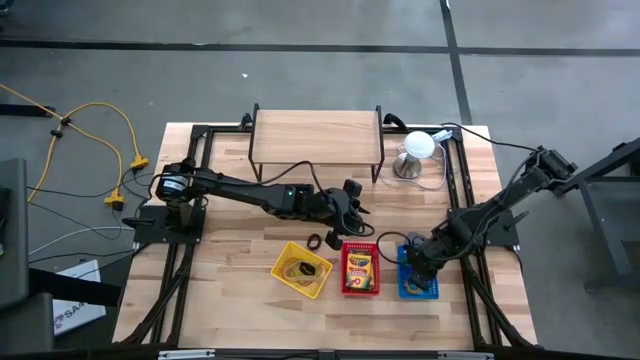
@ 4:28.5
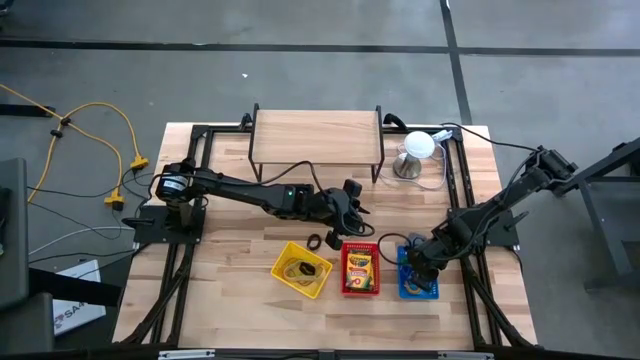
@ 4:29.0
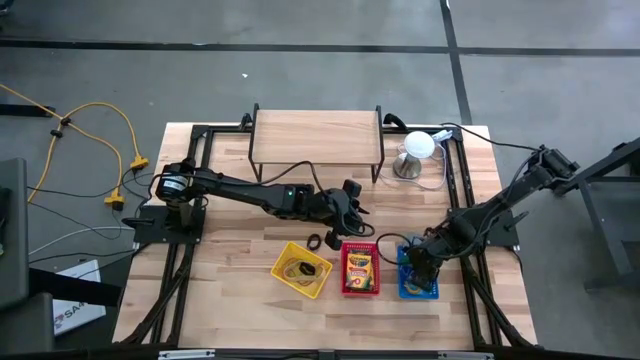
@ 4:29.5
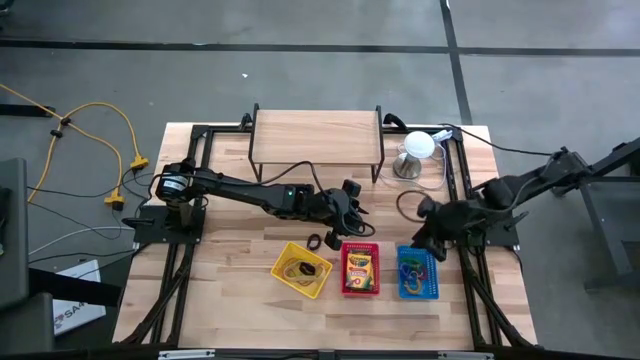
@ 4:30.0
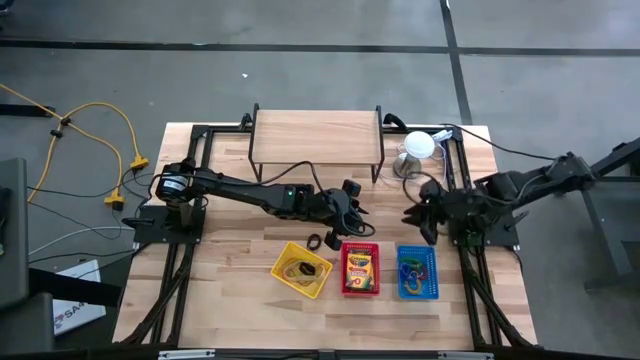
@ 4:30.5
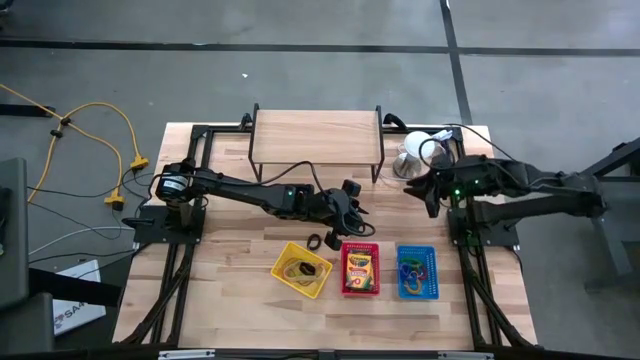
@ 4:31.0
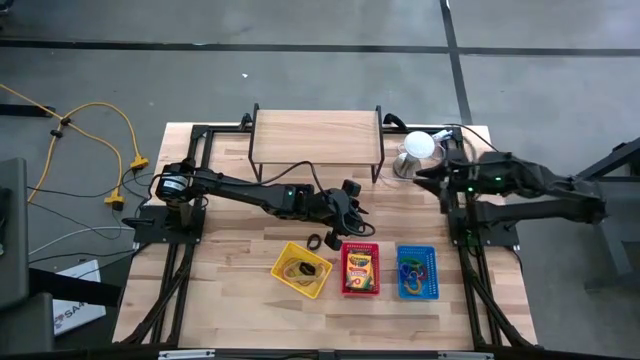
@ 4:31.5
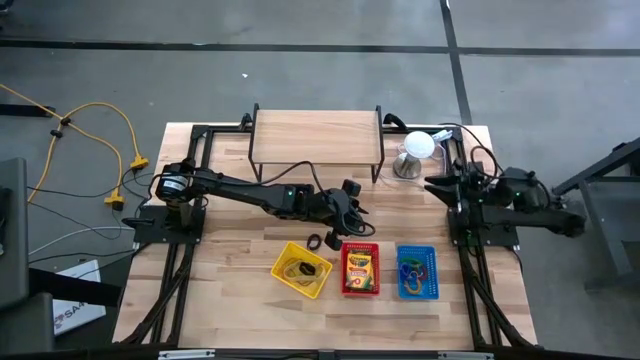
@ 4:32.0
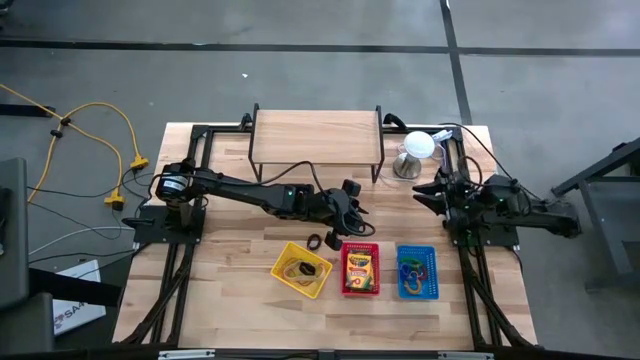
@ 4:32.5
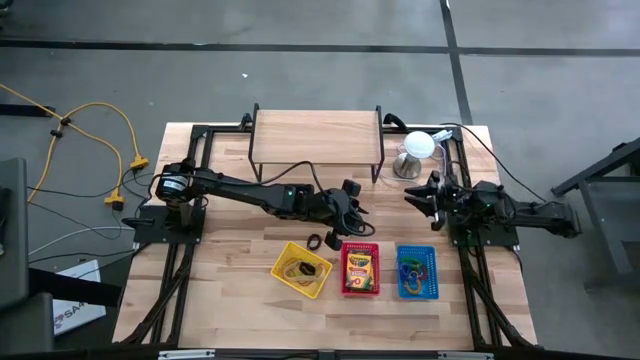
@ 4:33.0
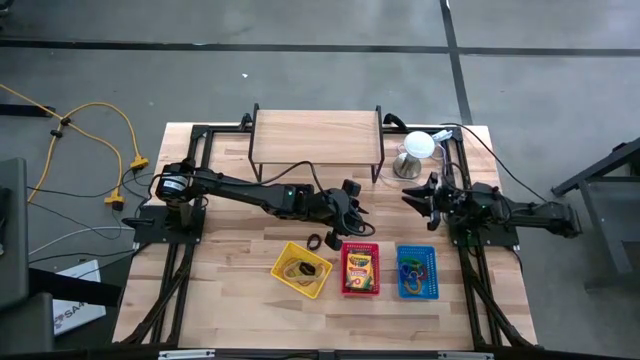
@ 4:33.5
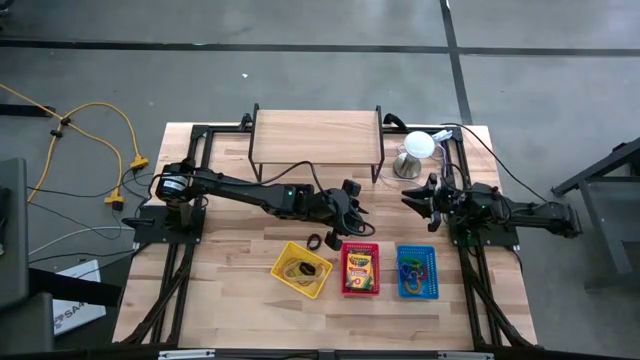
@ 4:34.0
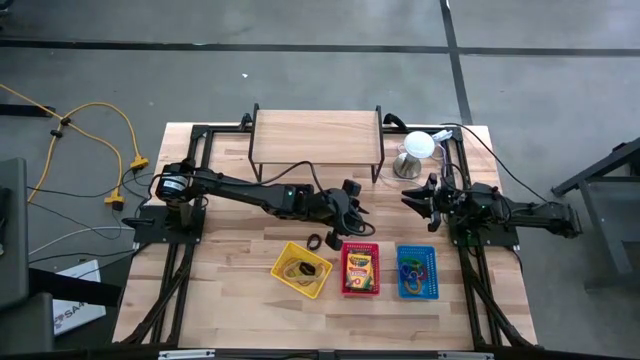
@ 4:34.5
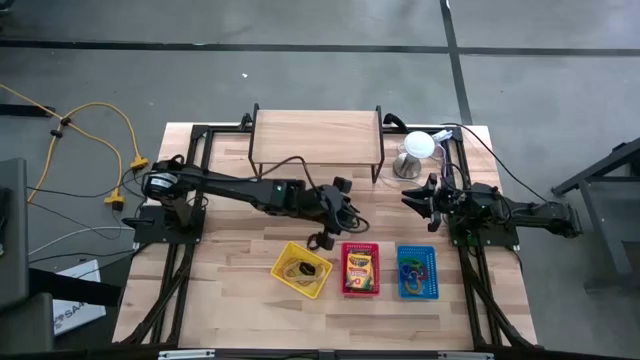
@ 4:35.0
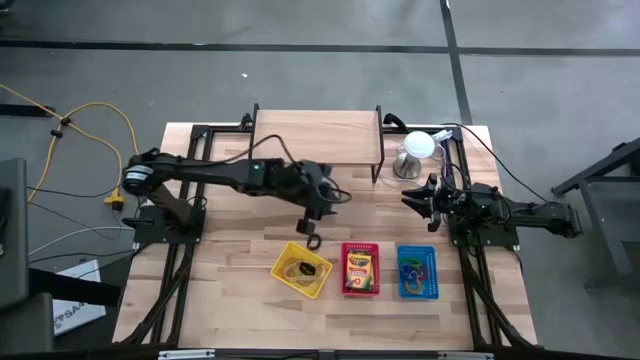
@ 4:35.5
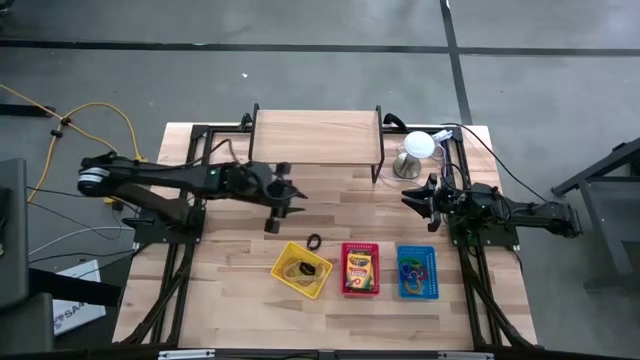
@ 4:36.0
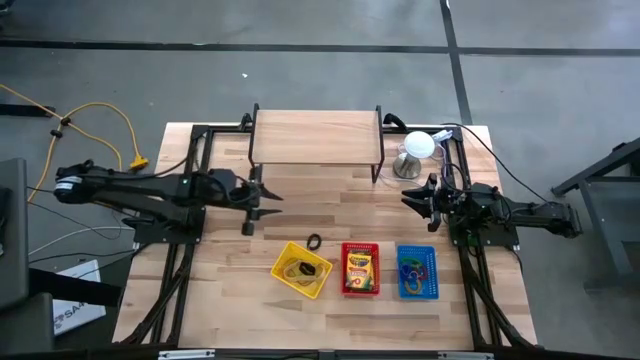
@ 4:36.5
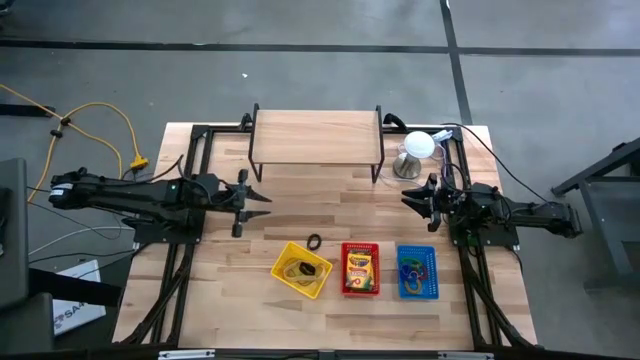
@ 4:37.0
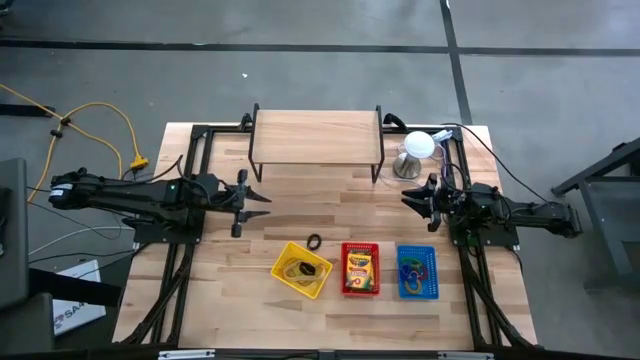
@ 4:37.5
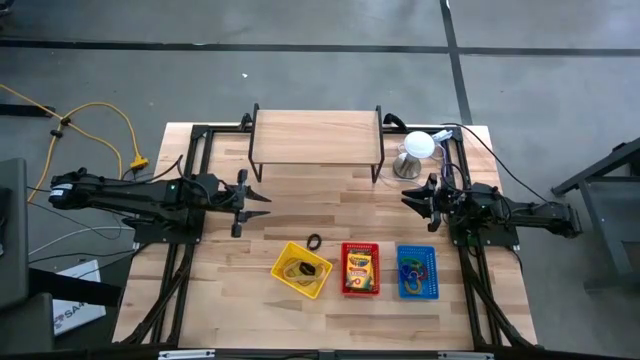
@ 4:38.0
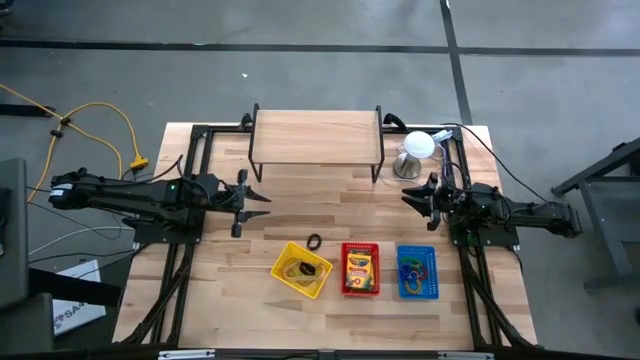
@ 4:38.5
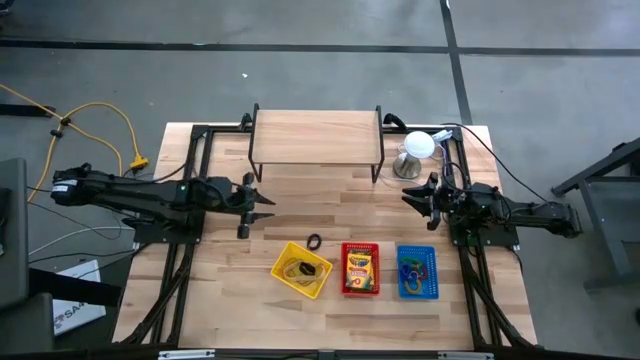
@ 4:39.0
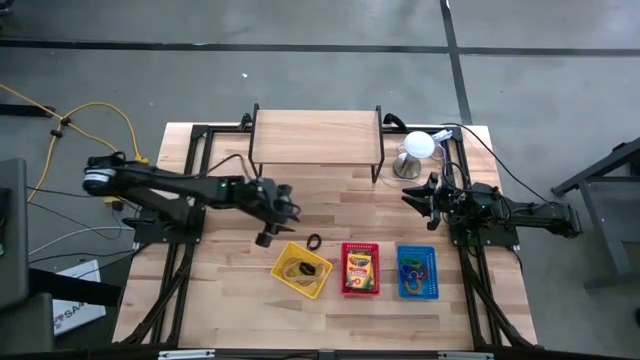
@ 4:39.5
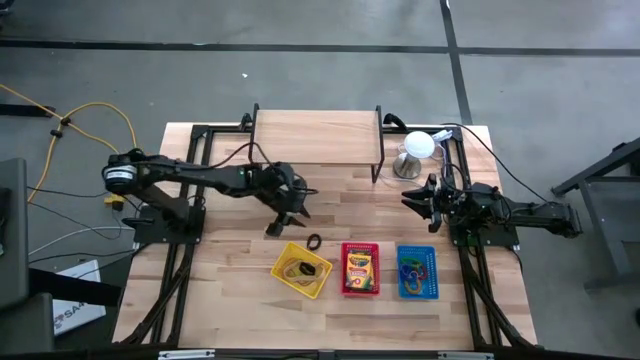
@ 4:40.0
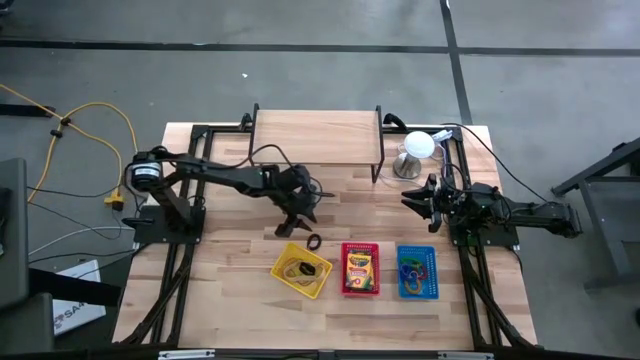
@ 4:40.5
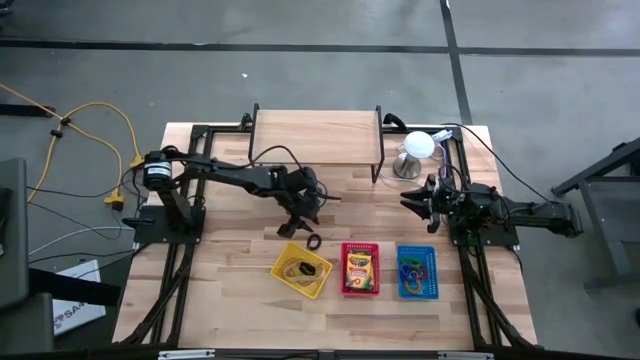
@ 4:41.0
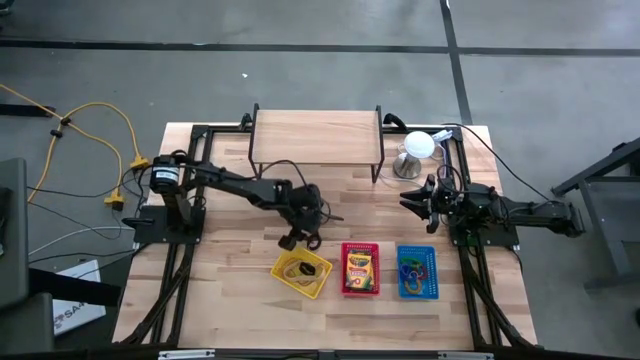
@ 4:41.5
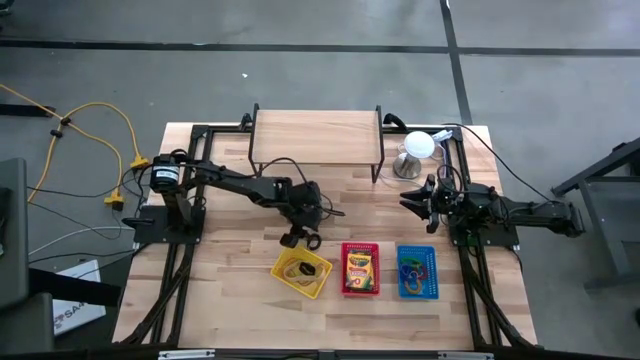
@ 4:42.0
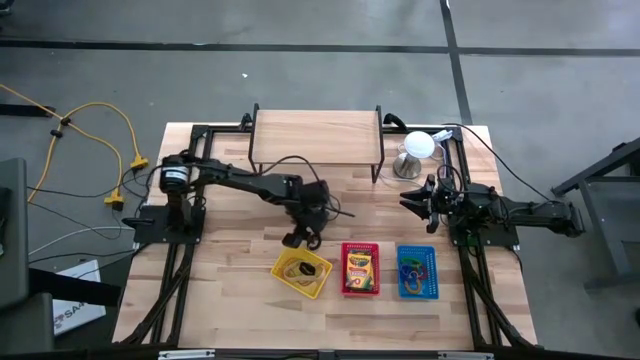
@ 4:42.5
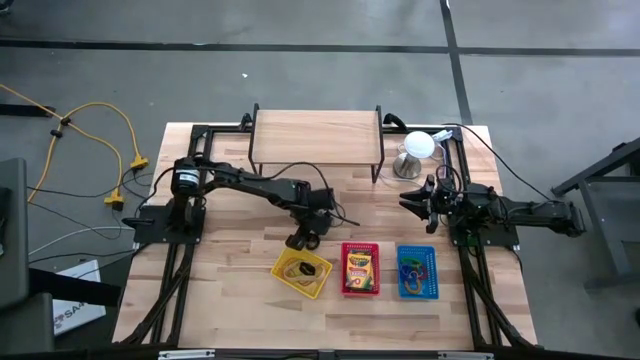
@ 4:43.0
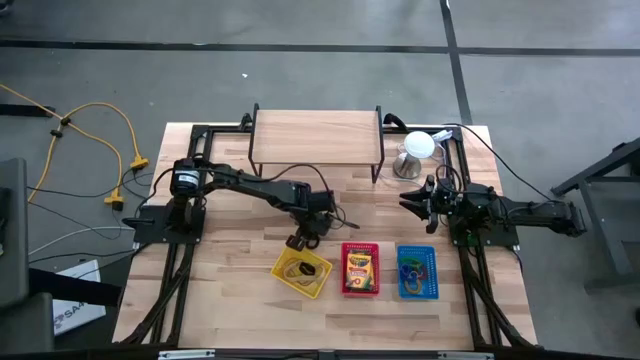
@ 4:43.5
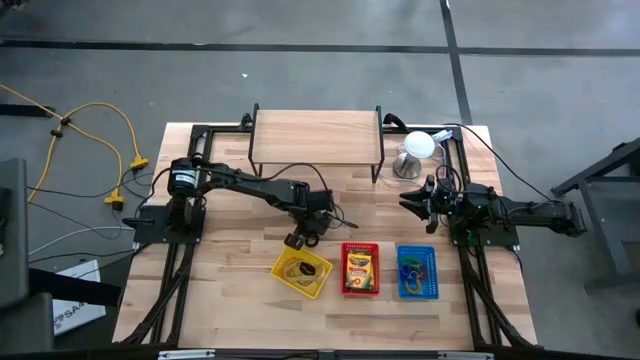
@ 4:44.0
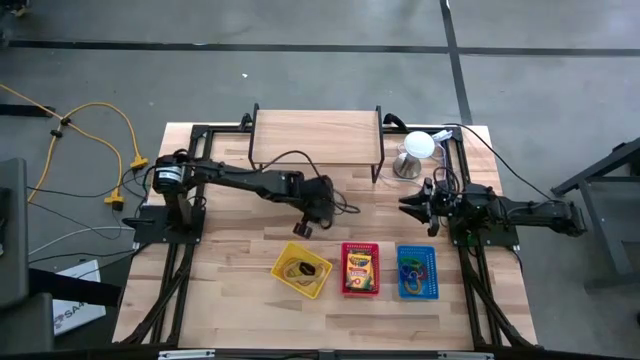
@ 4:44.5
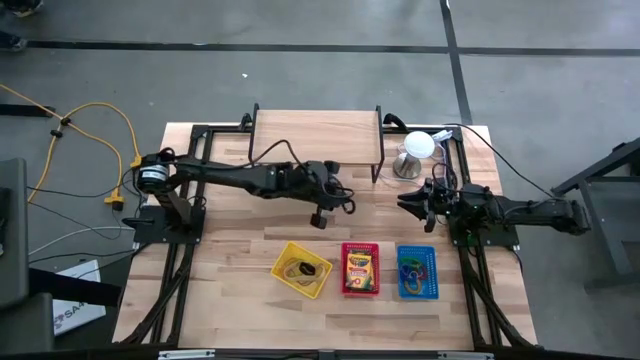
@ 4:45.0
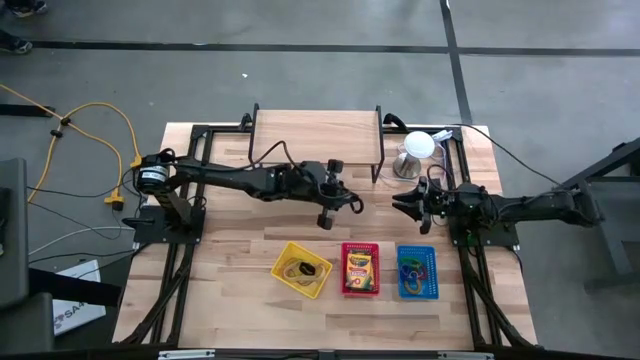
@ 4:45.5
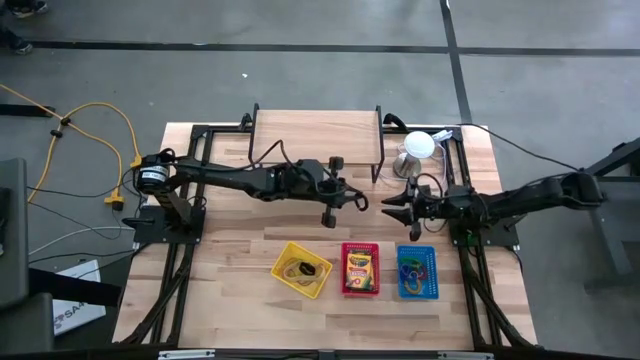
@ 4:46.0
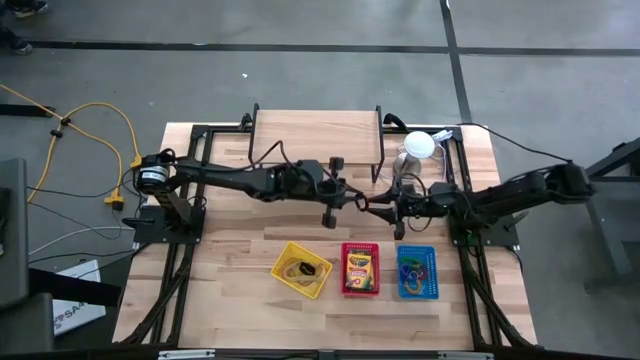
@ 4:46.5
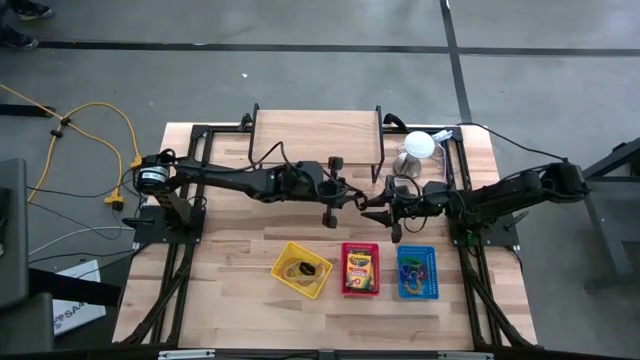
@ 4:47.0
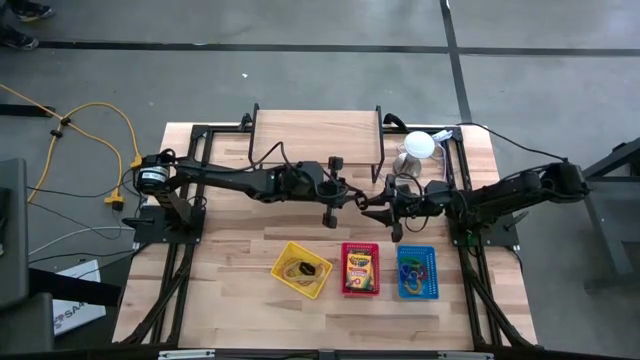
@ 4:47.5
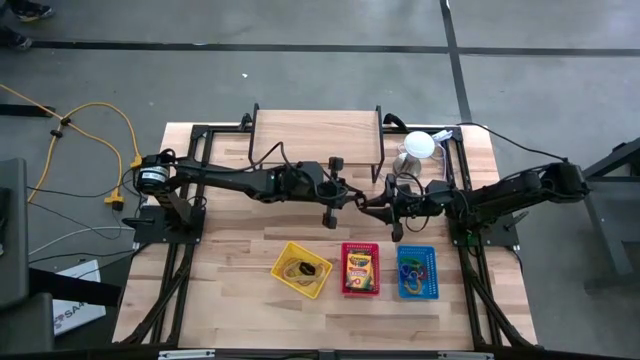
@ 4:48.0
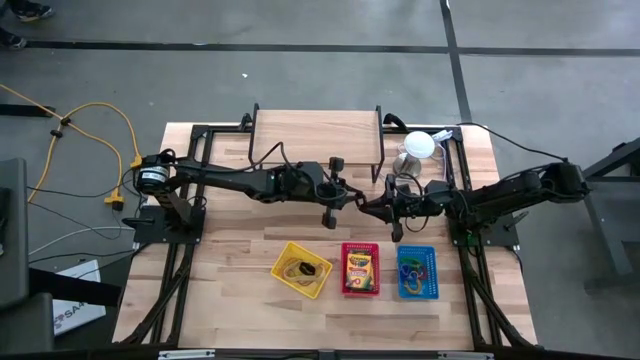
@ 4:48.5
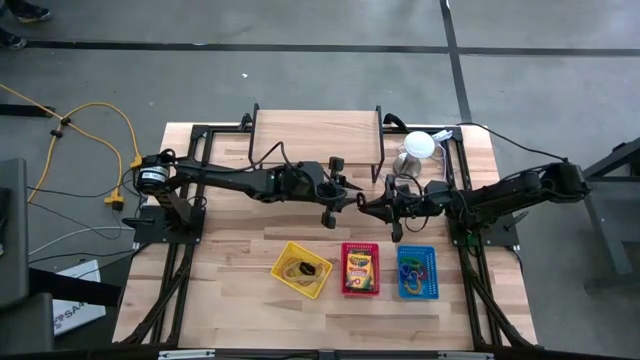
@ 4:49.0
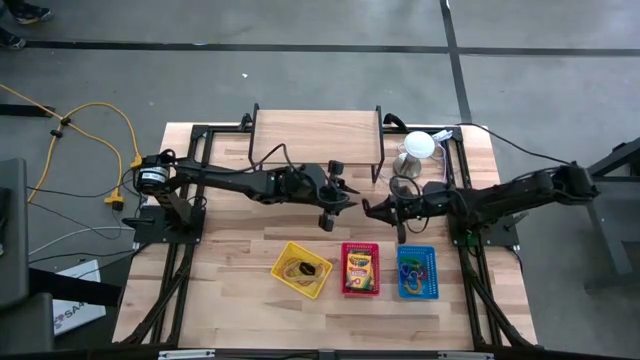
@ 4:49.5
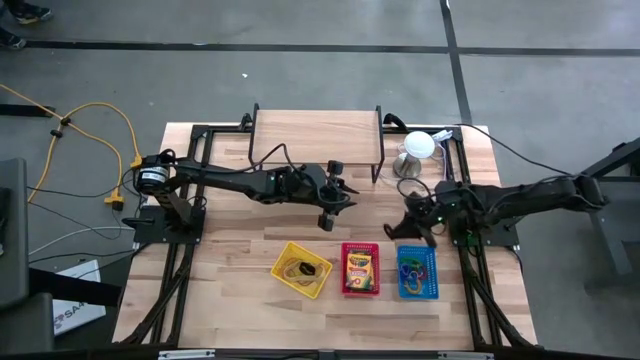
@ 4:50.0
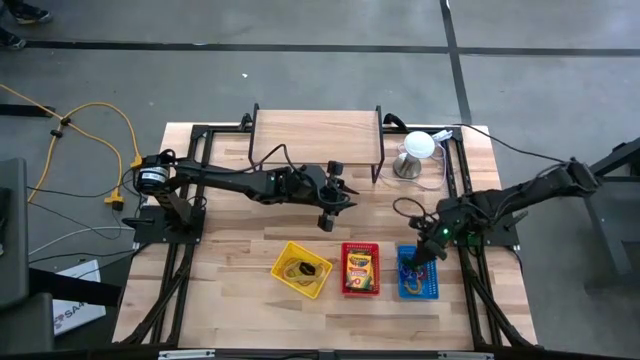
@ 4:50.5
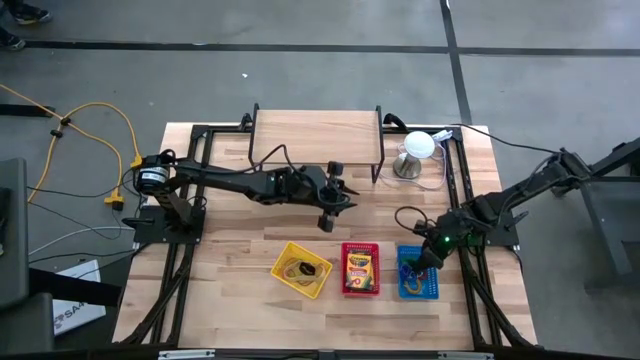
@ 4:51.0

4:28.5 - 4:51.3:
Task: Pick & Place Office Desk Supplies
Put the black spring keychain into the blue bin
